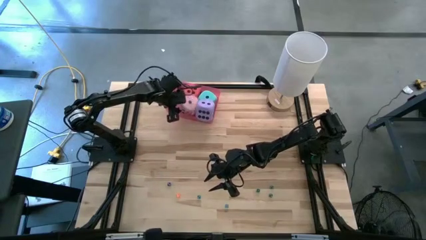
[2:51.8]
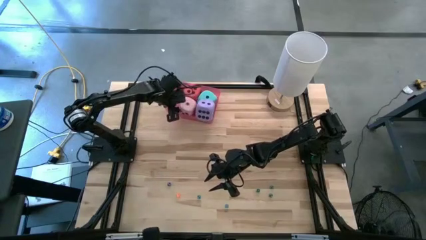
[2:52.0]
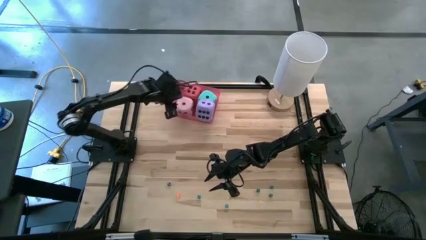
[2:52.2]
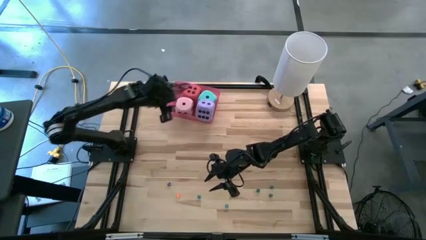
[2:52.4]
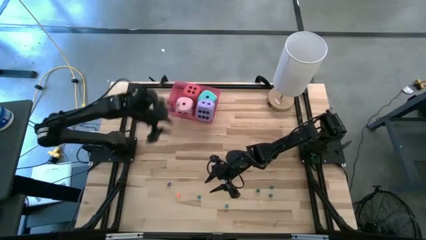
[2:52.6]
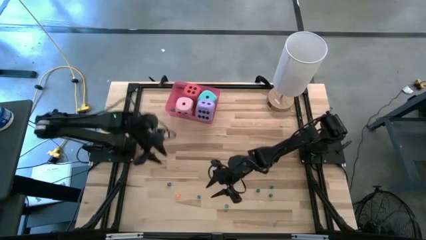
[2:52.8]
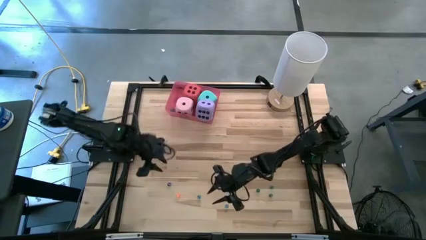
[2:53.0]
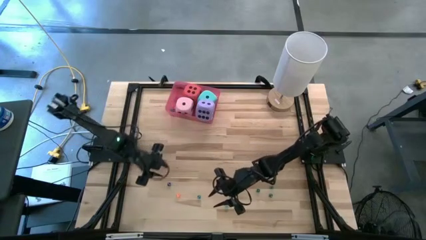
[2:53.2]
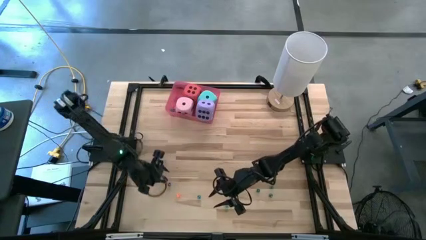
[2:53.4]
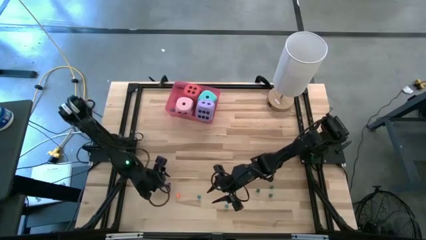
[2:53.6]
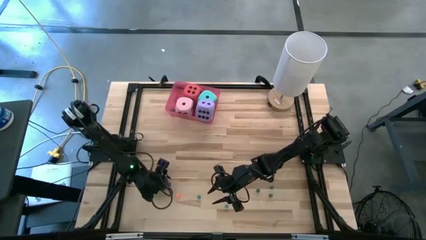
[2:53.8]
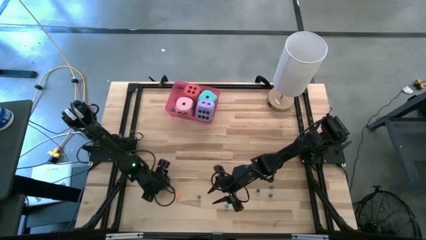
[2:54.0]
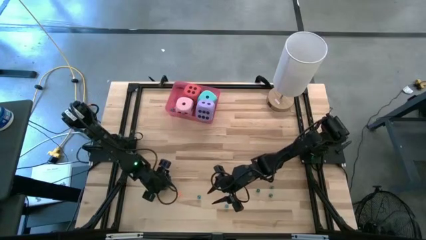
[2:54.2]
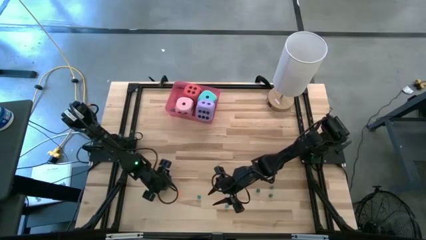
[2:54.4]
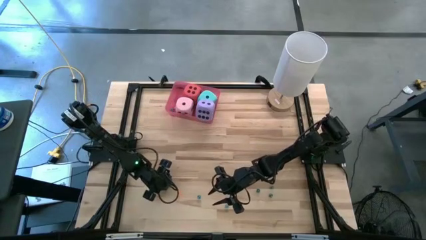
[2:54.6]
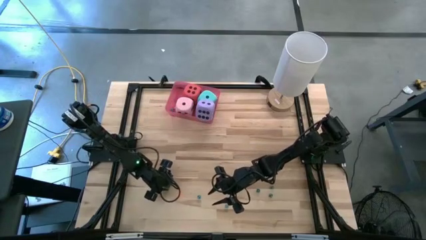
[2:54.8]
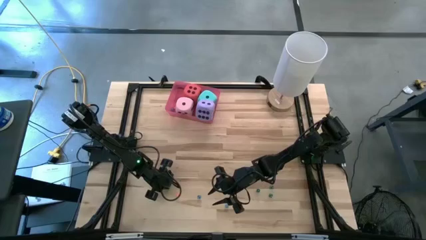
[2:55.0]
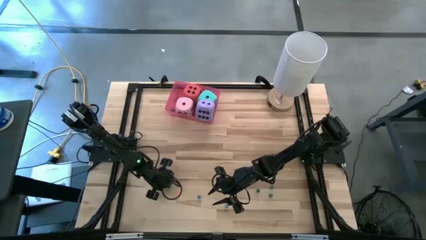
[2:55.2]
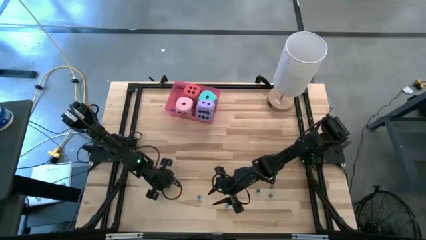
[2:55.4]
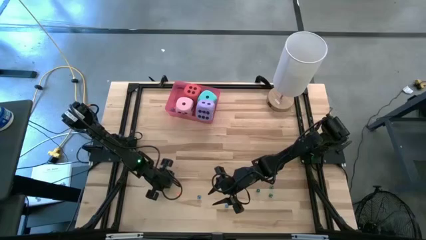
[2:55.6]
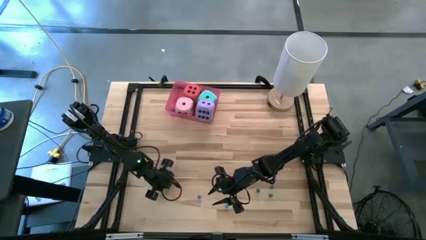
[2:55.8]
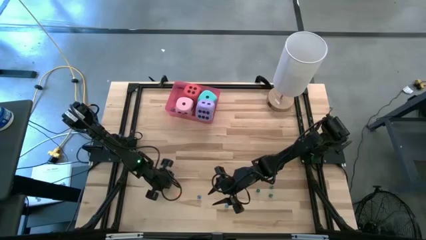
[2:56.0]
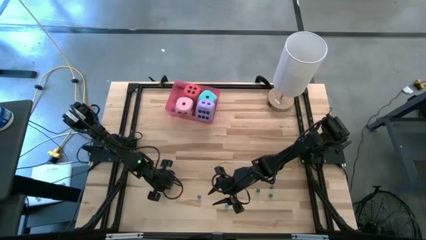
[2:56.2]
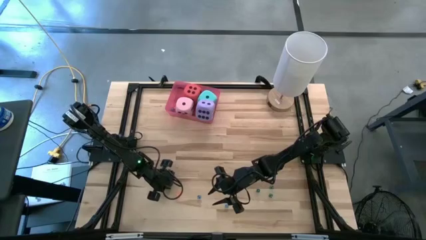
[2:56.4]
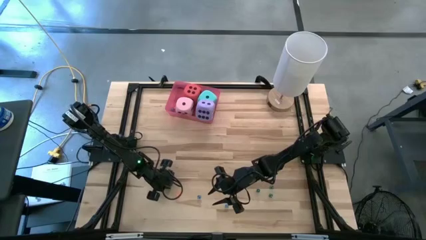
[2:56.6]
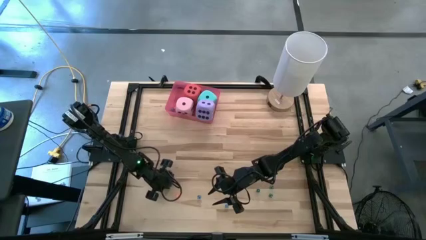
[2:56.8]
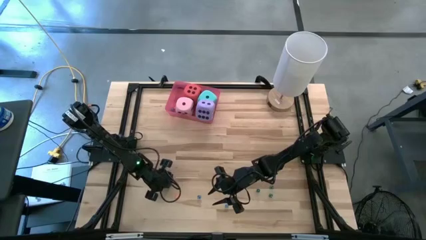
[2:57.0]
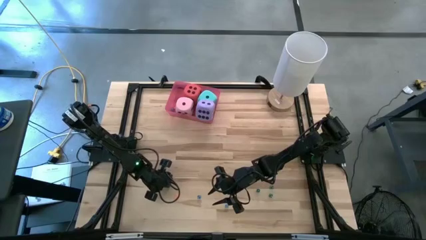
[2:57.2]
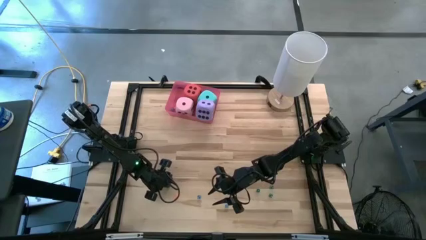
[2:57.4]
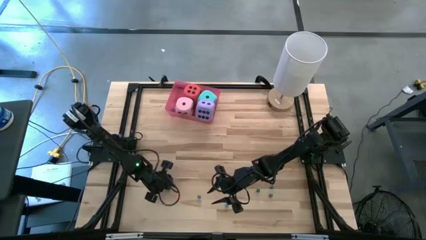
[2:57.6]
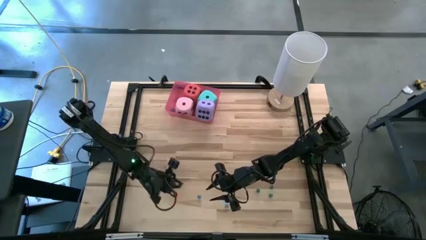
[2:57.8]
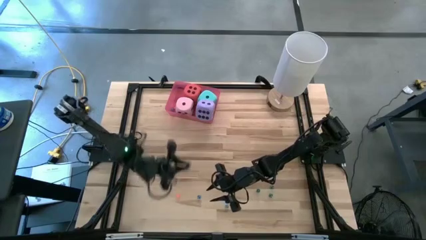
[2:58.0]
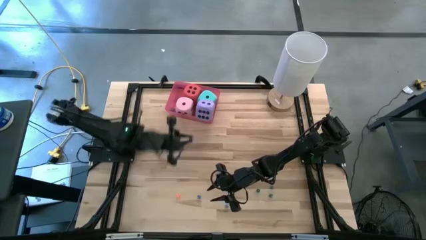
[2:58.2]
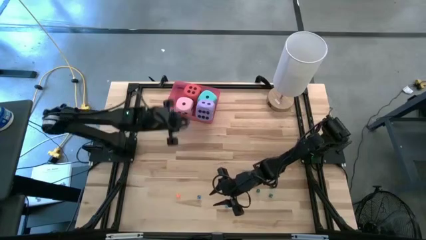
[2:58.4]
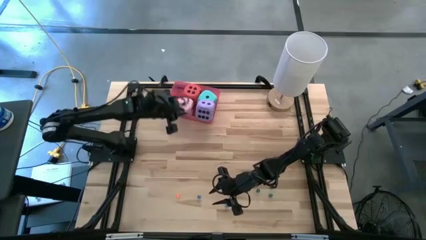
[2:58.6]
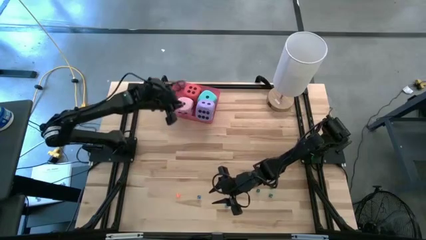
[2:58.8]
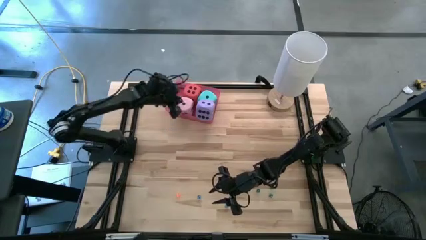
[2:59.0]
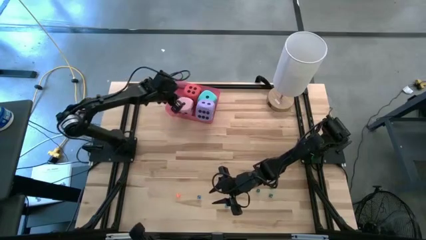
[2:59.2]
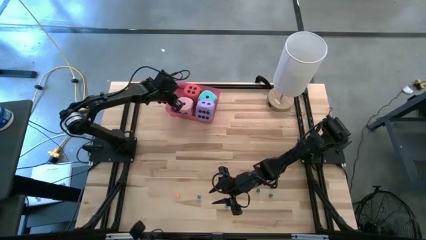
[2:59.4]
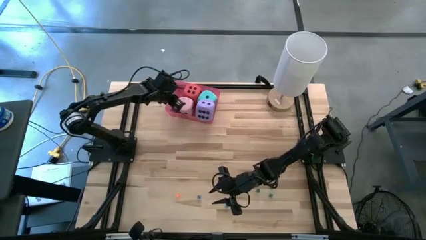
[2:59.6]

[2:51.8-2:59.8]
Task: Pick & Place Dice
Put the dark blue small dice into the pink bin

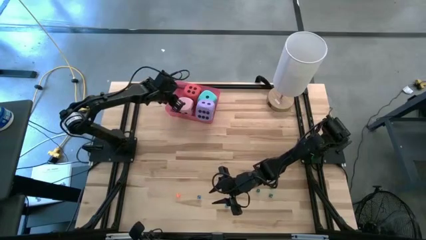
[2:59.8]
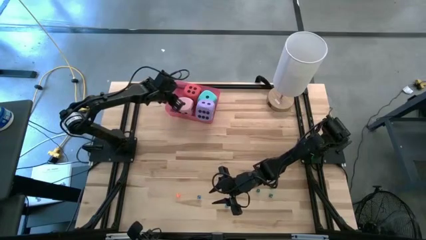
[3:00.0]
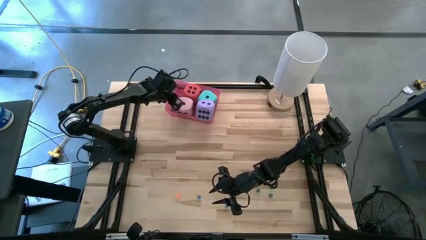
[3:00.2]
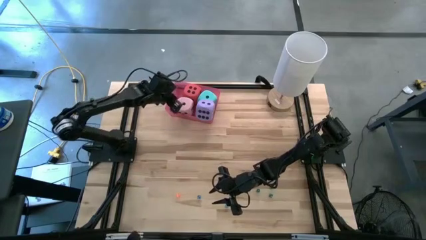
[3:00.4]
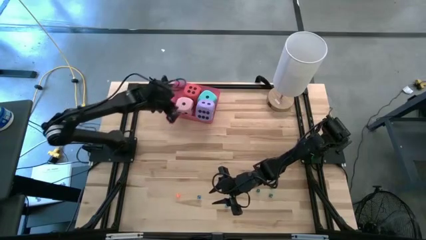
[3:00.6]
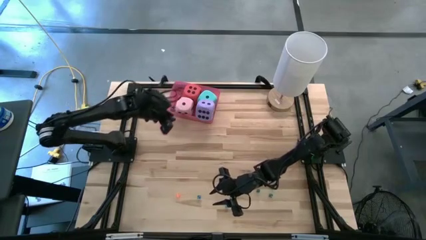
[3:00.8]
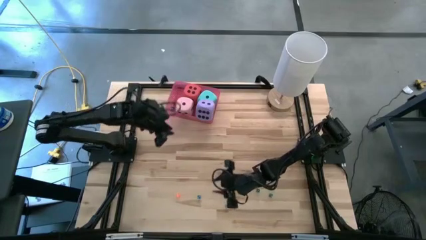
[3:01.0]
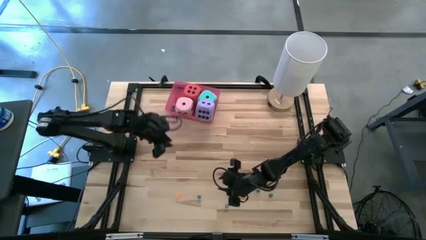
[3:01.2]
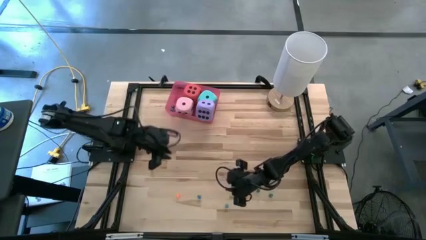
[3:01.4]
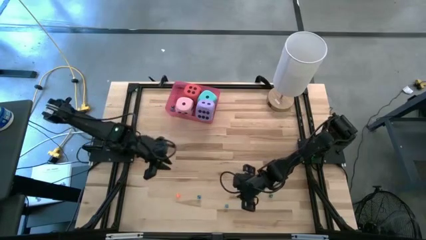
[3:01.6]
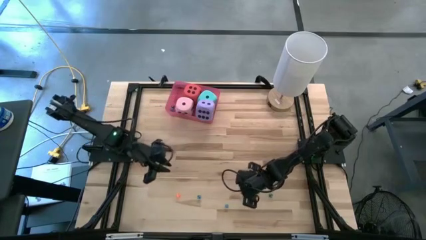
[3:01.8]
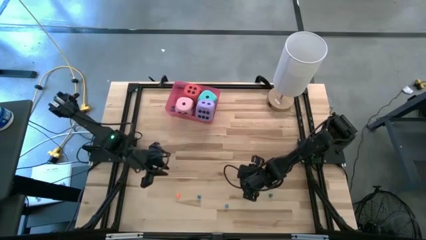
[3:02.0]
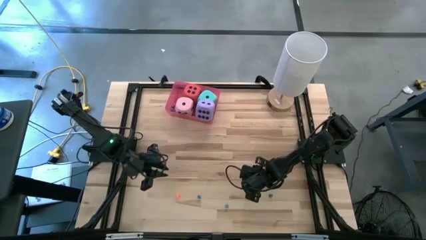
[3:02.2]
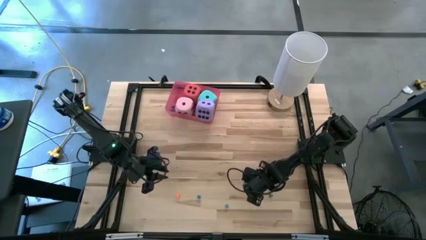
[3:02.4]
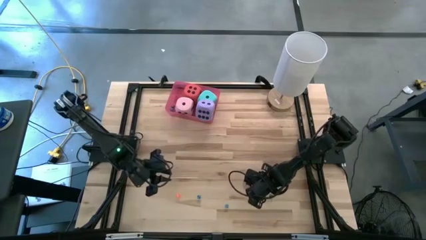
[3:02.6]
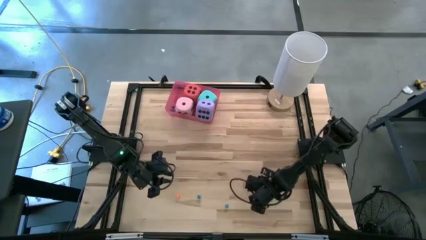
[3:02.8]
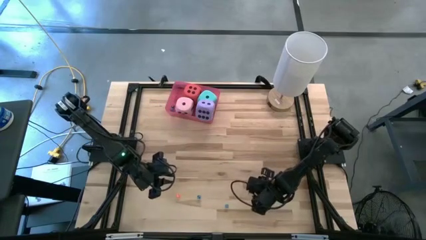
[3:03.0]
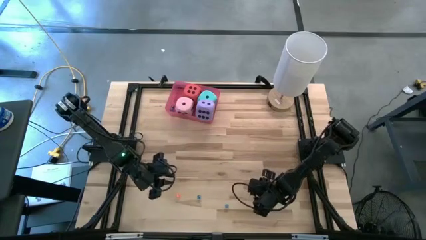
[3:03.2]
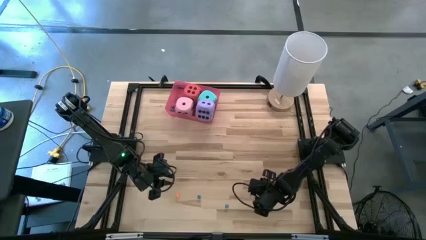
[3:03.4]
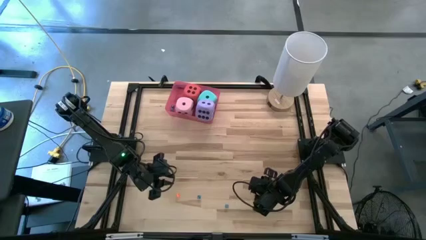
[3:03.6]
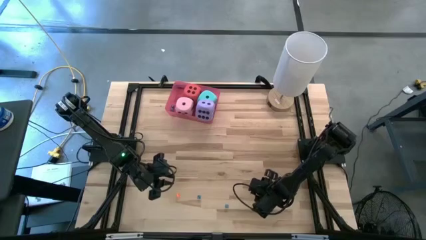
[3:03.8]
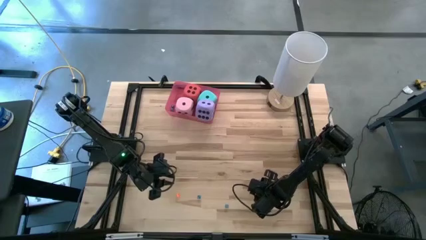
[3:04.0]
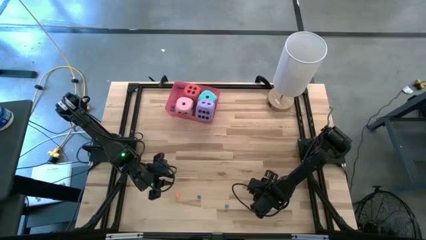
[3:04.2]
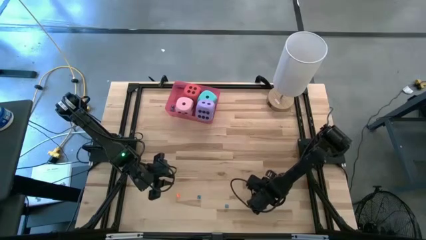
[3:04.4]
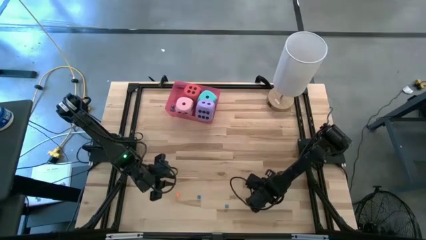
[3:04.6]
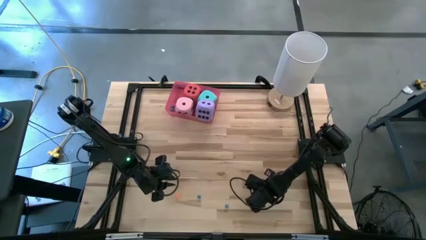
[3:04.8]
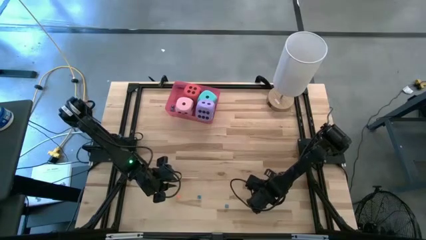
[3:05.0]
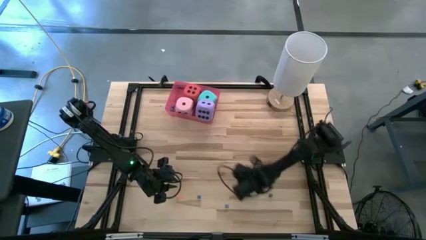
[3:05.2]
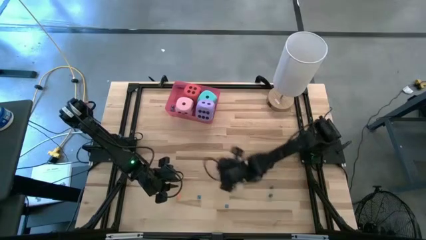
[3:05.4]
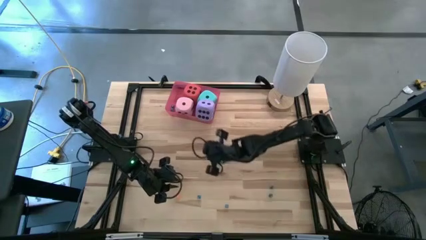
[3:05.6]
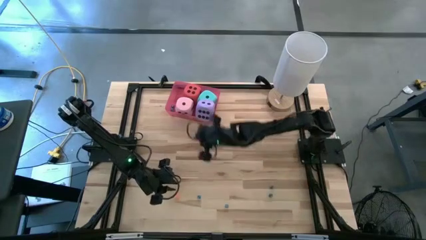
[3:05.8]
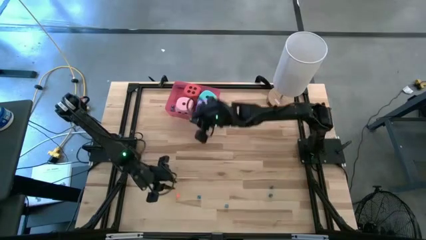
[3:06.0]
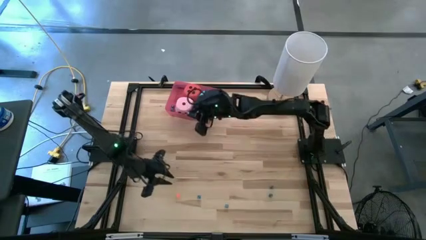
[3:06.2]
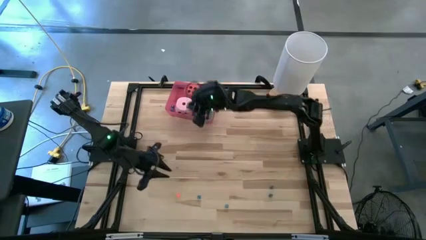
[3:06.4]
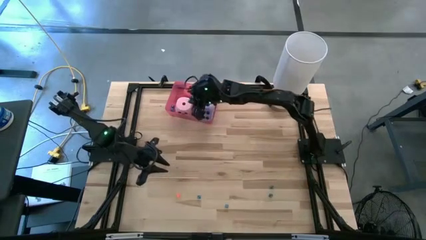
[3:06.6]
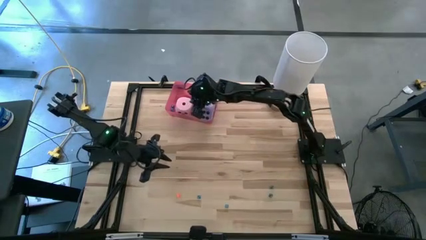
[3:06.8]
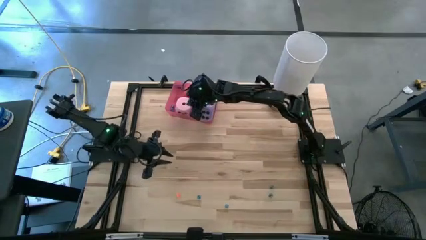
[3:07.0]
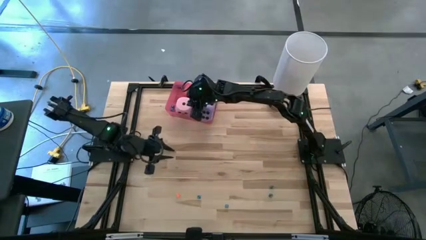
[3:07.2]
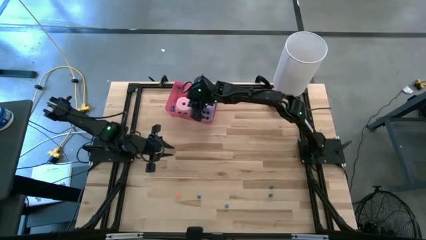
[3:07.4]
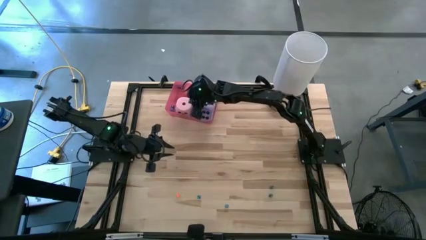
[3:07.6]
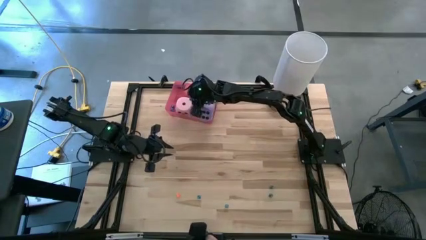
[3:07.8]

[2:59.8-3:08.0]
Put the small green dice into the pink bin
